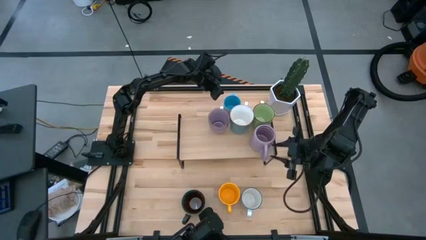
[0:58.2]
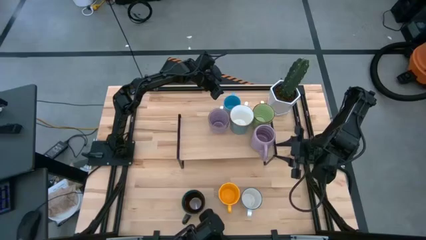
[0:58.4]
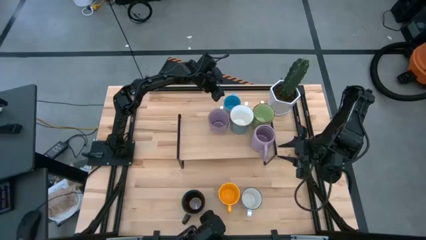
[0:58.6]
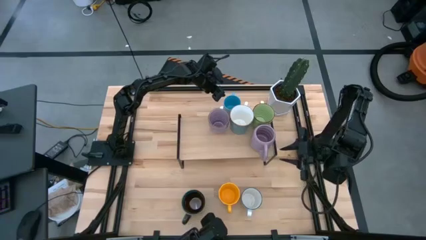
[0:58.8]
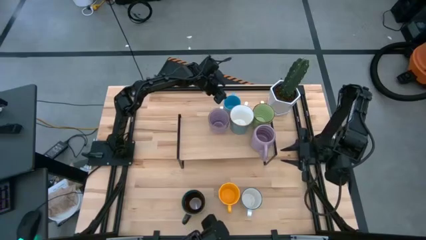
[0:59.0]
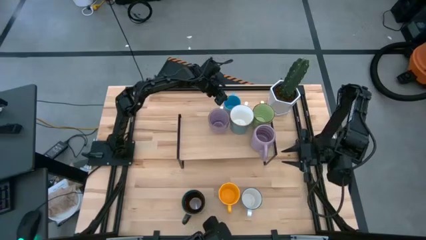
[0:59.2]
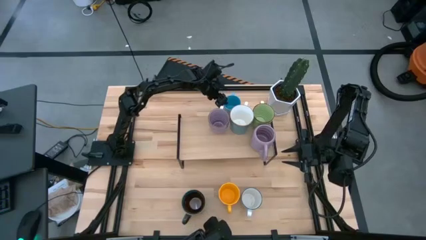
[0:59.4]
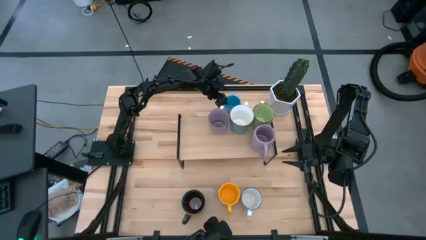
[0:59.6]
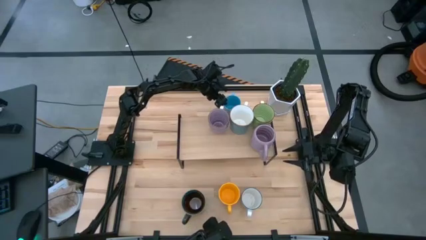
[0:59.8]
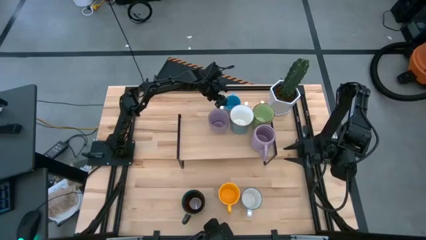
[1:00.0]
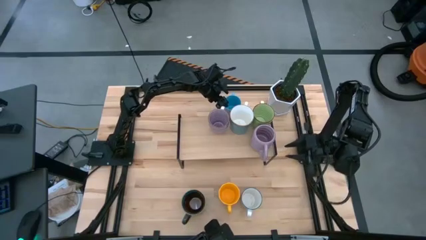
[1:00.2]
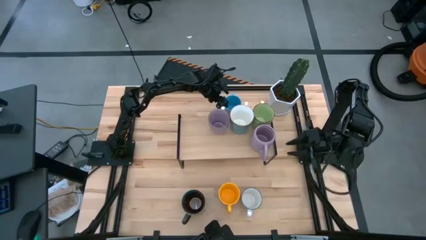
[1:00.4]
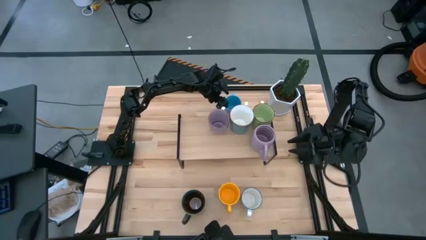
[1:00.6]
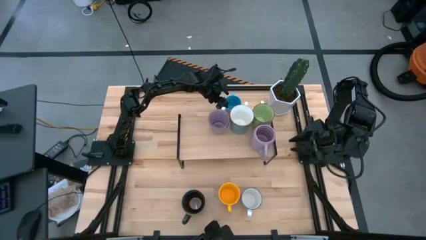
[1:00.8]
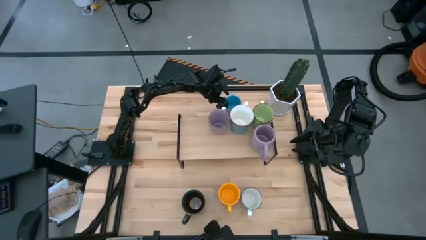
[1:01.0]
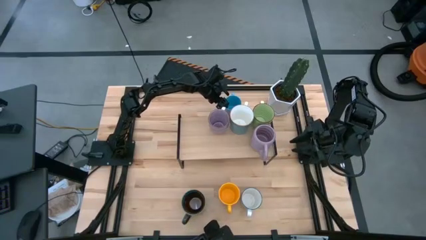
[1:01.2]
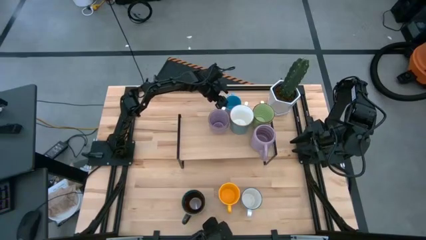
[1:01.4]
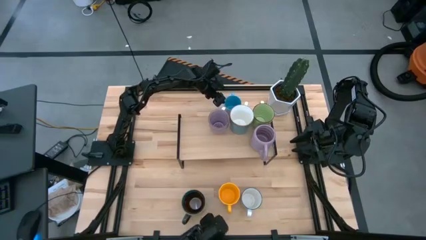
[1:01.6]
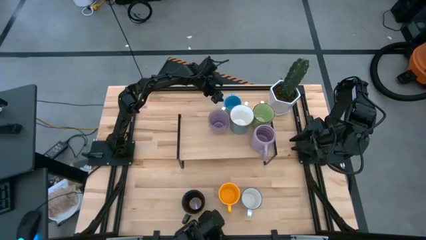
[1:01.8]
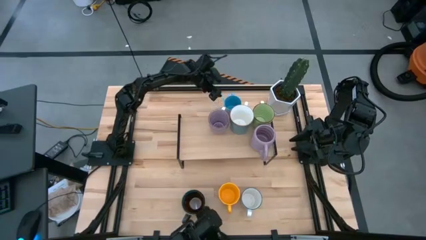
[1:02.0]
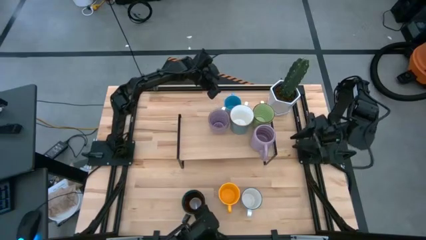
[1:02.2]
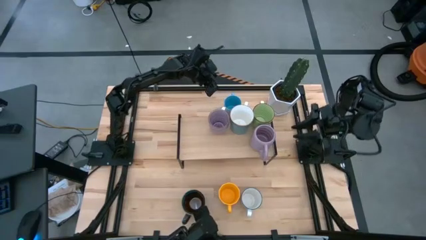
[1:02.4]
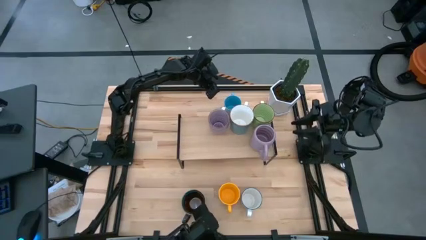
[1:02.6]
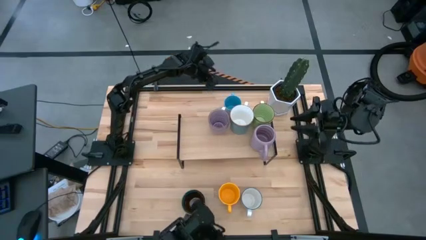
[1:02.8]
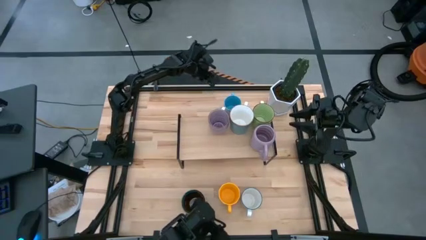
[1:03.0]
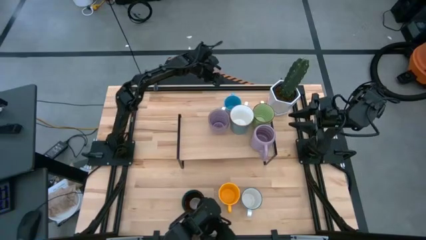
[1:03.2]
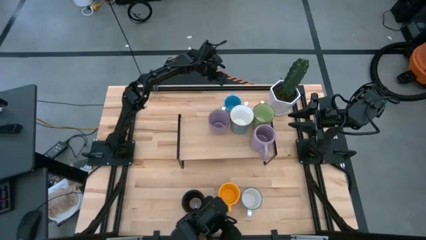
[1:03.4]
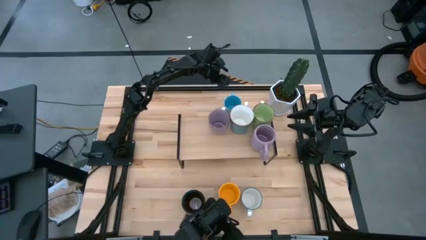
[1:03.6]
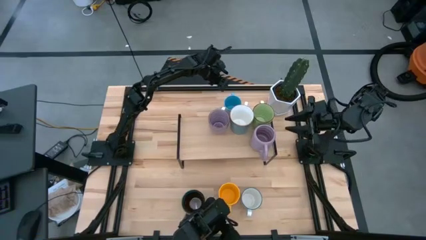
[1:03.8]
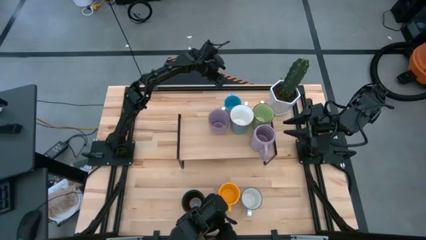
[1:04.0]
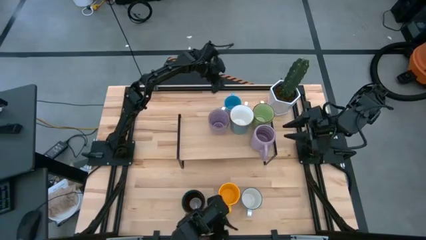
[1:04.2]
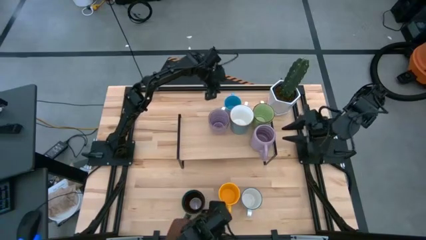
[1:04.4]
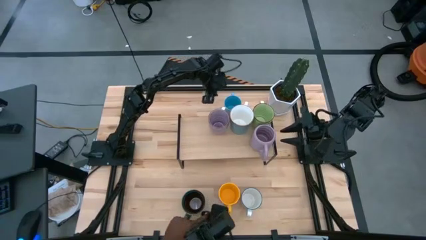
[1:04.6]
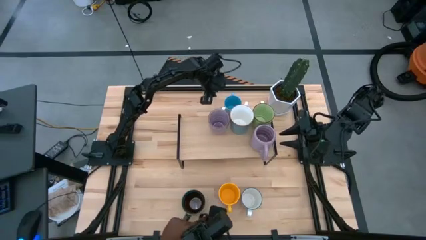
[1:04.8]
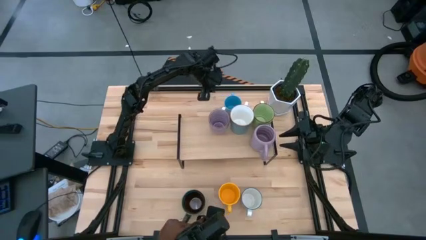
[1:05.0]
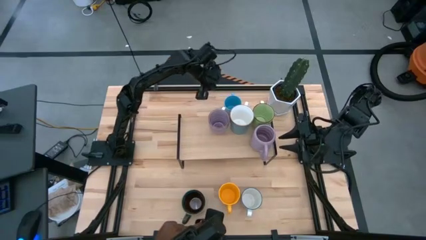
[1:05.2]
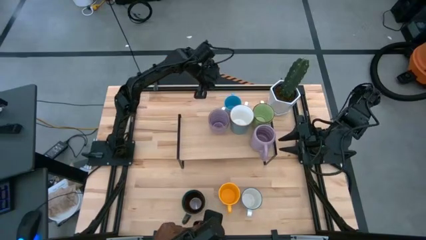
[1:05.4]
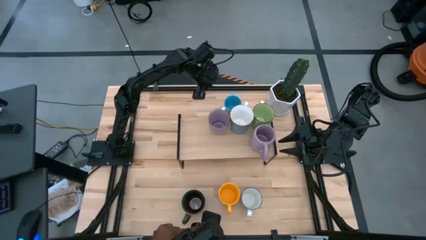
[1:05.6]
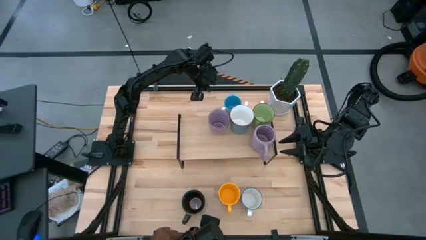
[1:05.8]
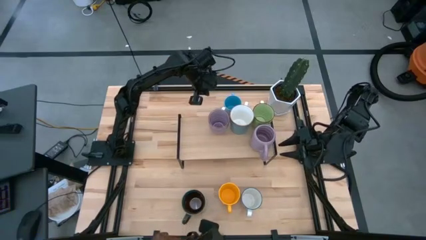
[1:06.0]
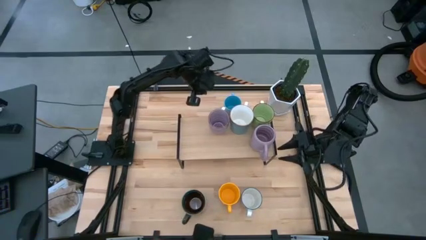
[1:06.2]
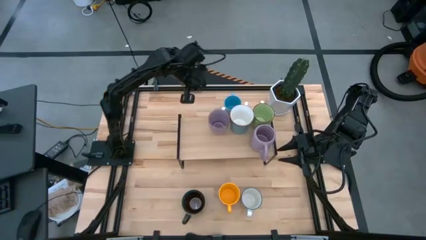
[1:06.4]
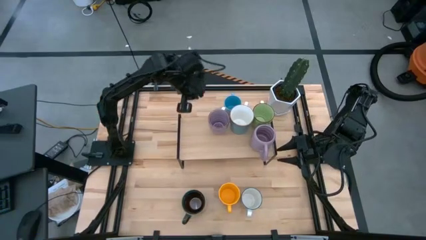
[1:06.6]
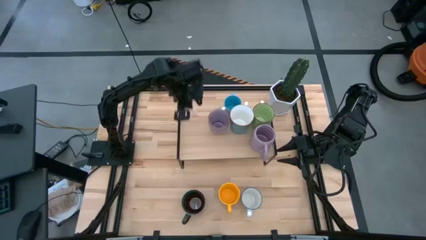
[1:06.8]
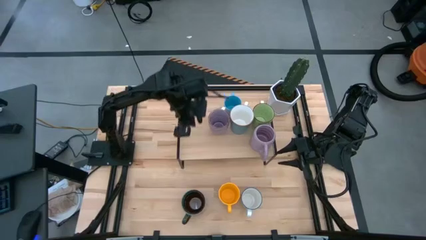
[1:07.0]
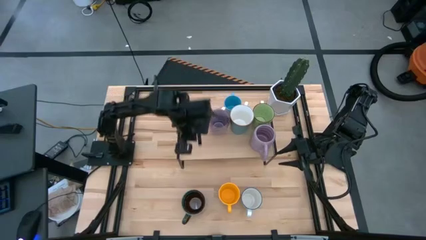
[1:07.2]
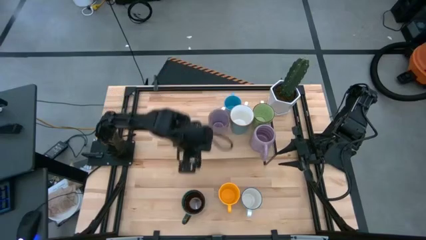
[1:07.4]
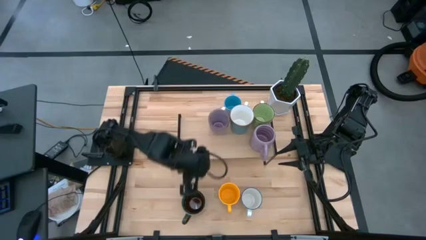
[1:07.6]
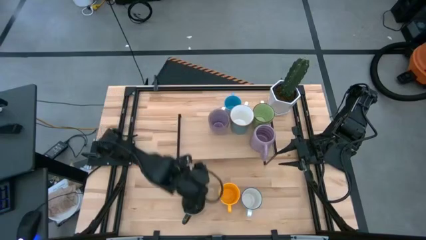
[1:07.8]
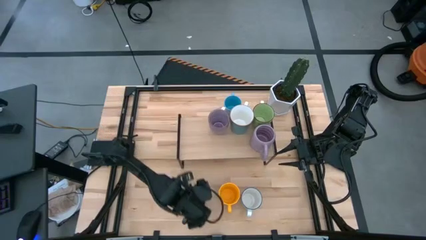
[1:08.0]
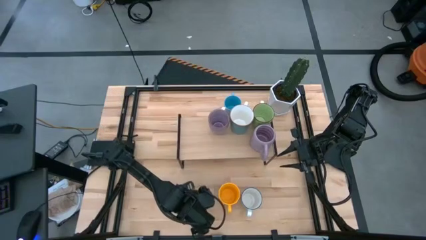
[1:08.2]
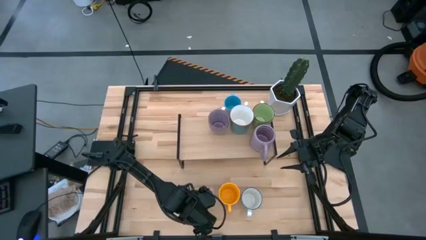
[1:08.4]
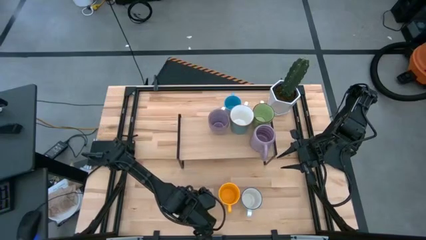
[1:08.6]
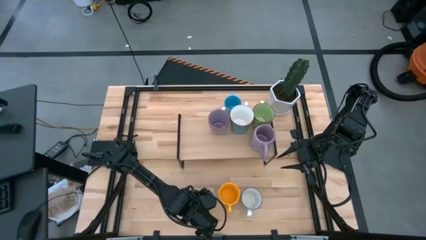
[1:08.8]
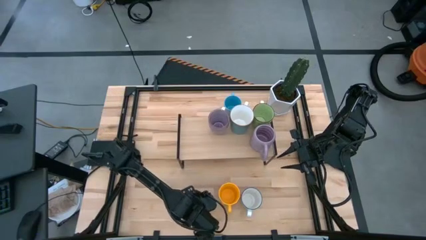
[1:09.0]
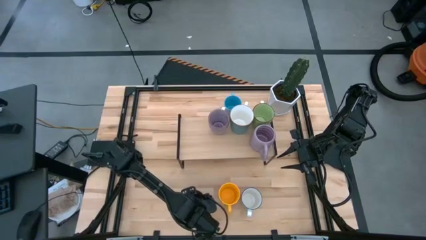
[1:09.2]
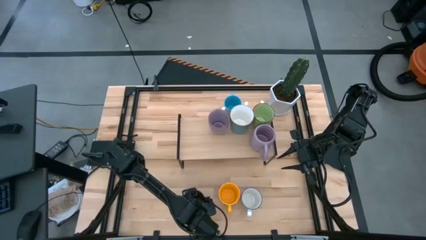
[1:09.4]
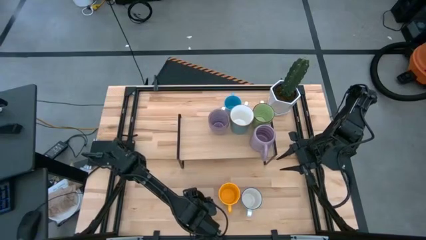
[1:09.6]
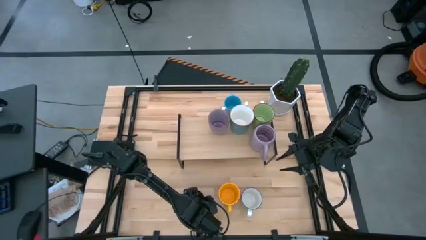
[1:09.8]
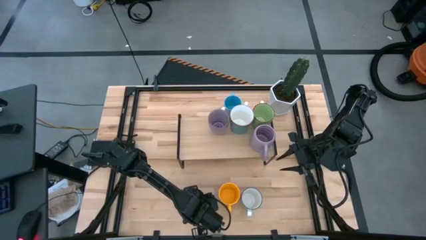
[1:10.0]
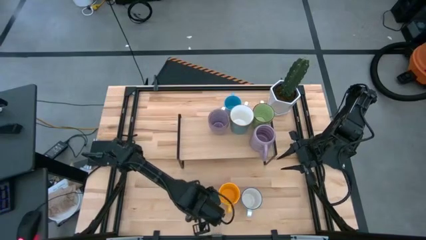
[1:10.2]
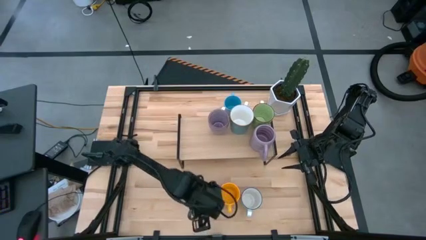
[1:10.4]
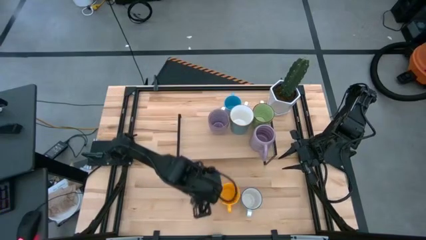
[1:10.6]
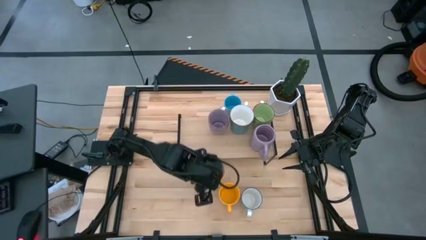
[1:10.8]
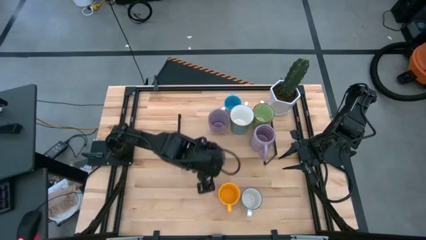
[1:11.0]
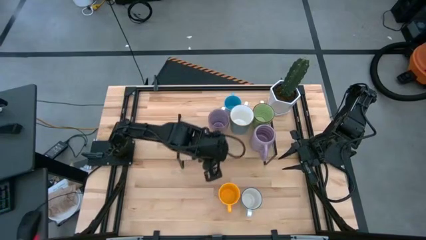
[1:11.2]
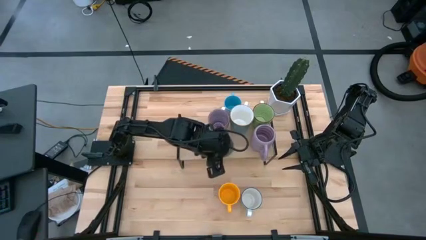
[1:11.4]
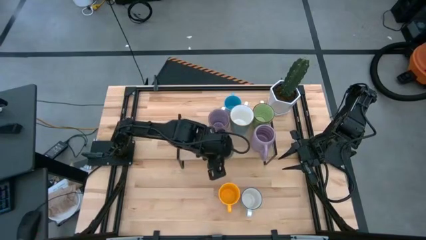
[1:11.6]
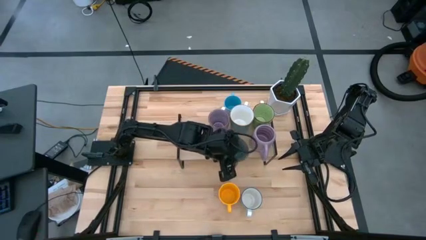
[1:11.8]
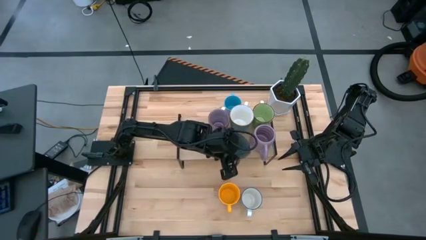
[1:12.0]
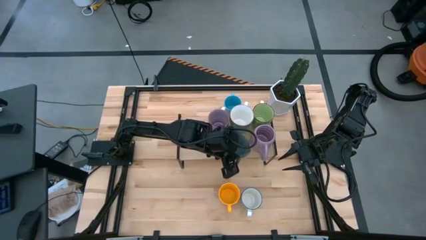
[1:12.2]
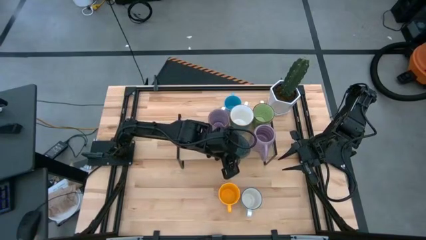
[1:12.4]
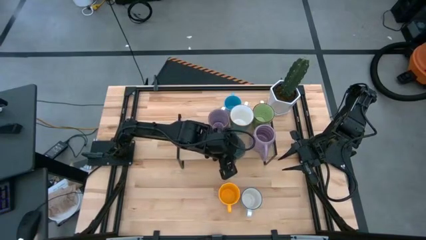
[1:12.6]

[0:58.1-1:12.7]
Task: Place coffee mugs
Put the patterned dark blue mug on the shelf

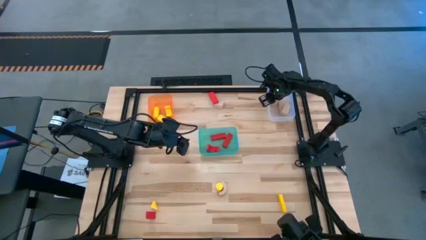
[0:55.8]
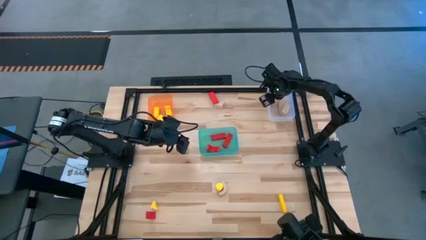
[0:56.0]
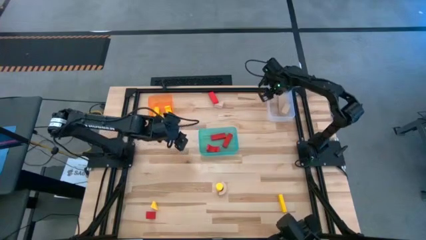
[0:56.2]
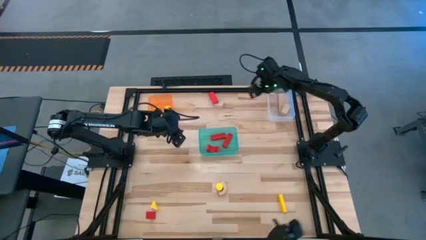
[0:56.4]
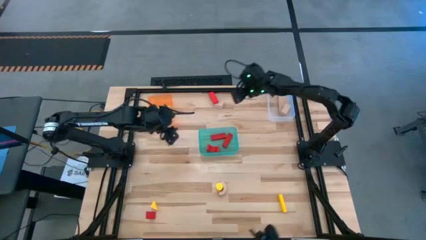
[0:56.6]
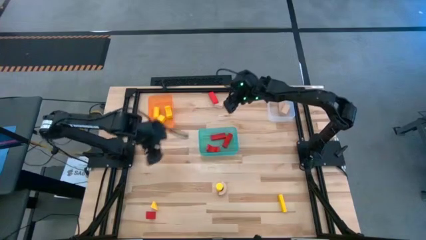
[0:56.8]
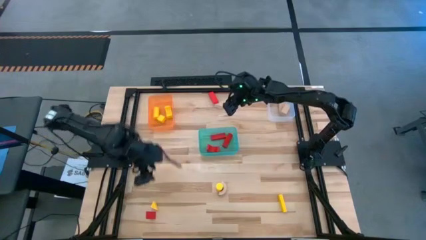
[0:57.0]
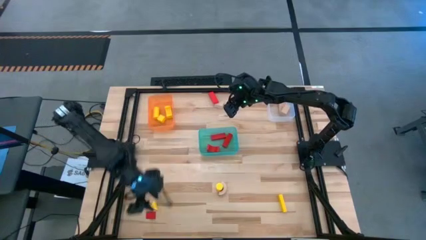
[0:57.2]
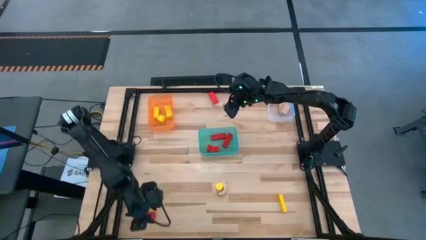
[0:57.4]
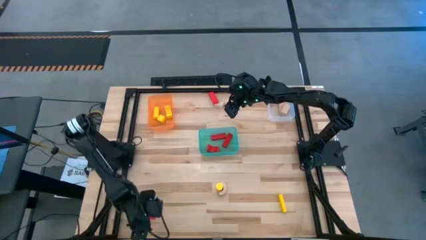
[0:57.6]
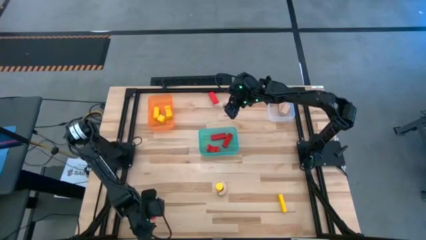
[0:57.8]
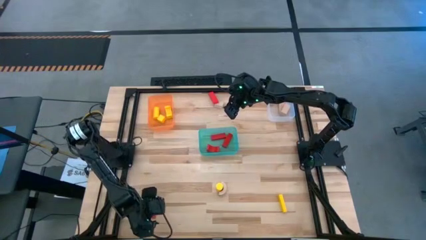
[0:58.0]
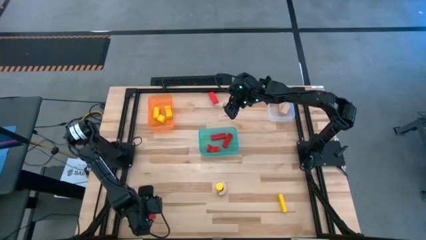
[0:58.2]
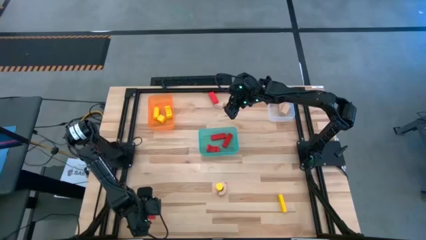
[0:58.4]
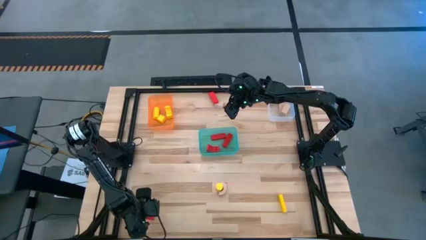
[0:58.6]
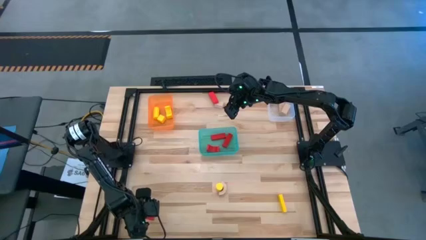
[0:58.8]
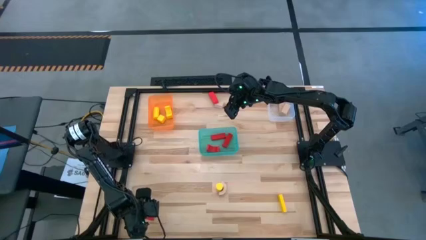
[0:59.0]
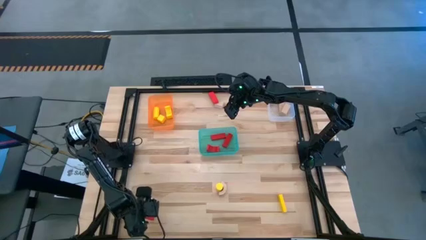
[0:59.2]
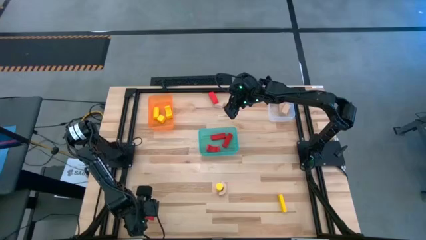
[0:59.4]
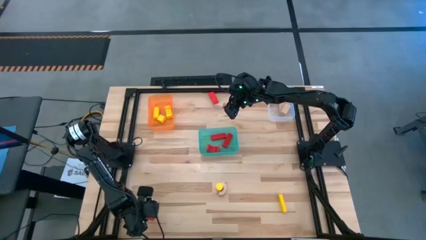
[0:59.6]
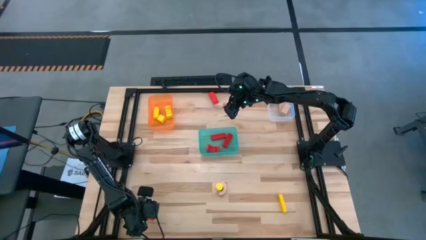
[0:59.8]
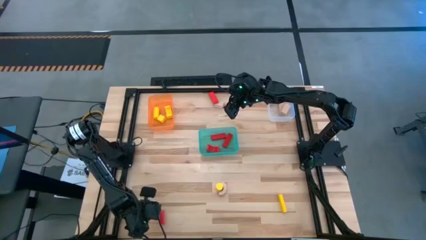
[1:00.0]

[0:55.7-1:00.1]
Task: Sort & place blocks by color
Put the red block into the blue bin
